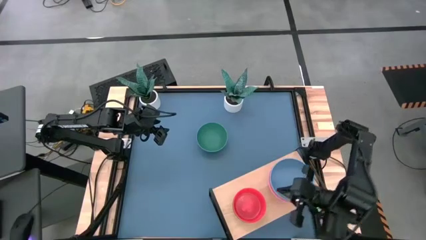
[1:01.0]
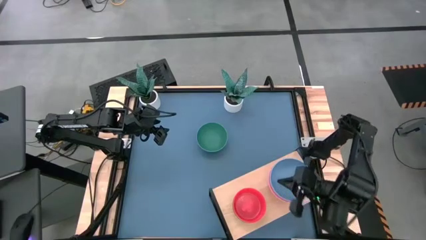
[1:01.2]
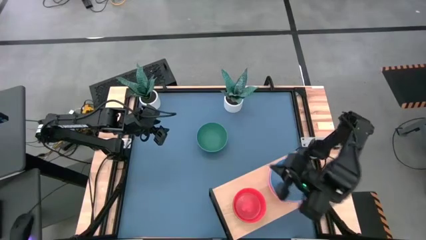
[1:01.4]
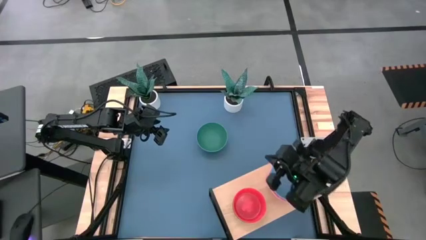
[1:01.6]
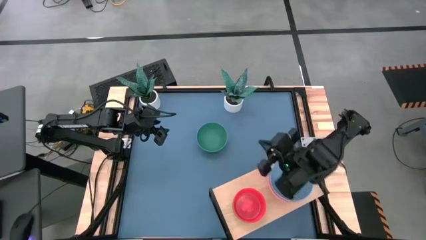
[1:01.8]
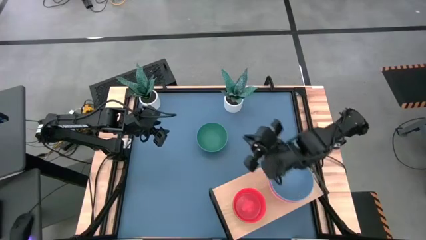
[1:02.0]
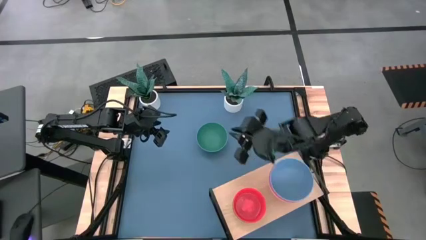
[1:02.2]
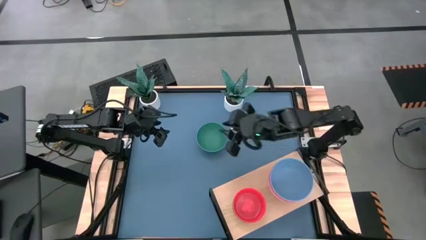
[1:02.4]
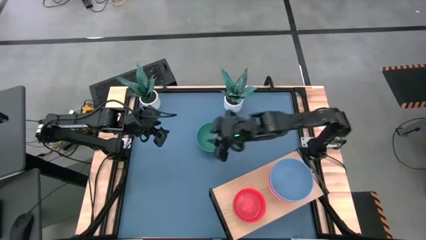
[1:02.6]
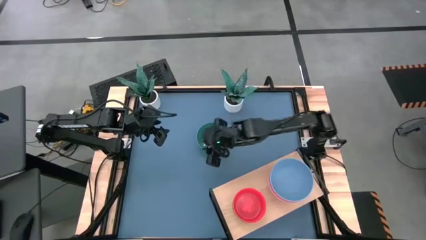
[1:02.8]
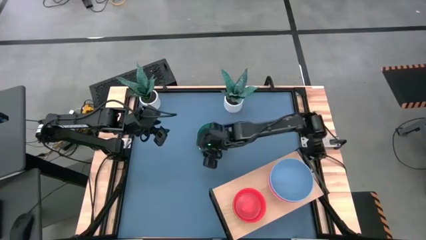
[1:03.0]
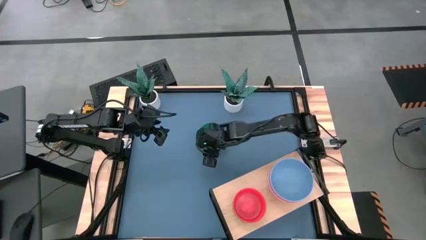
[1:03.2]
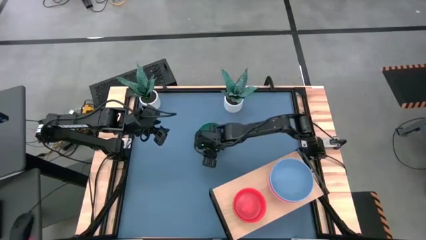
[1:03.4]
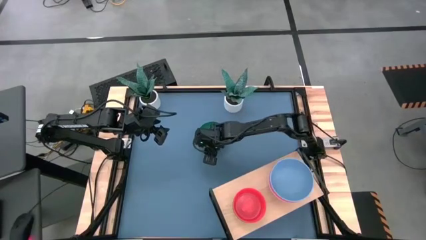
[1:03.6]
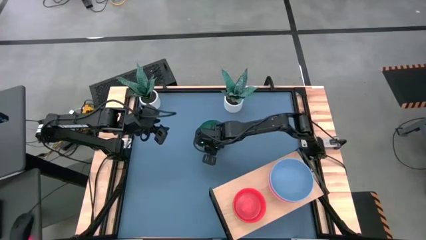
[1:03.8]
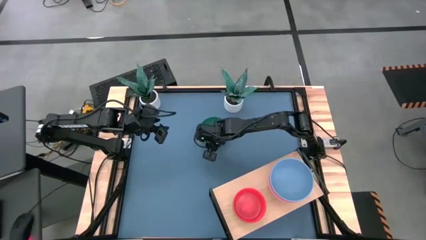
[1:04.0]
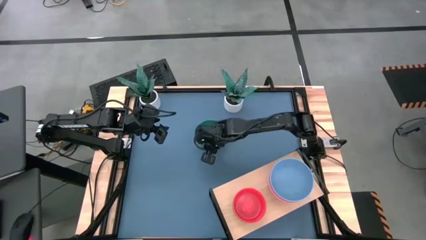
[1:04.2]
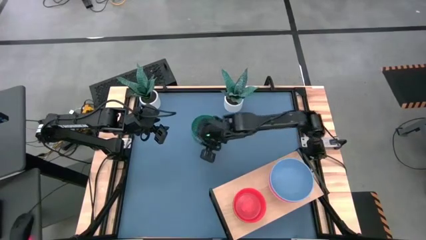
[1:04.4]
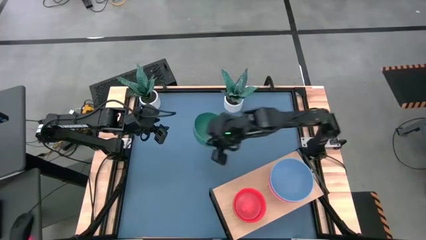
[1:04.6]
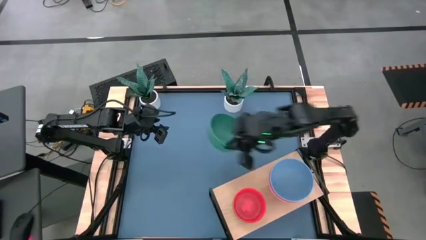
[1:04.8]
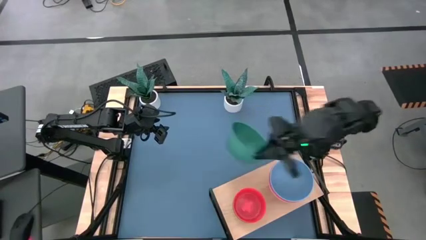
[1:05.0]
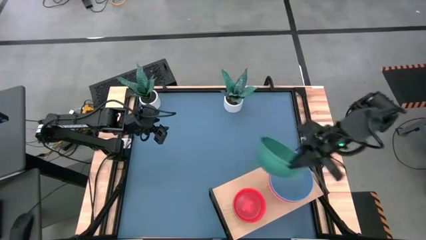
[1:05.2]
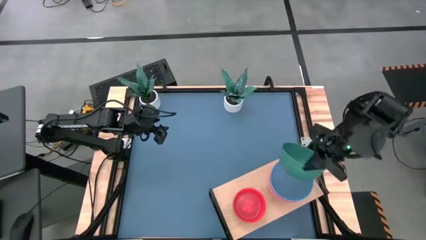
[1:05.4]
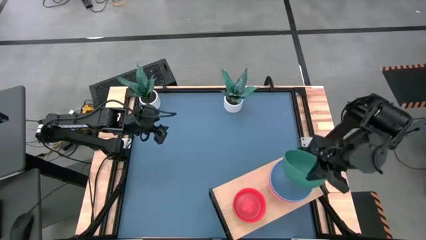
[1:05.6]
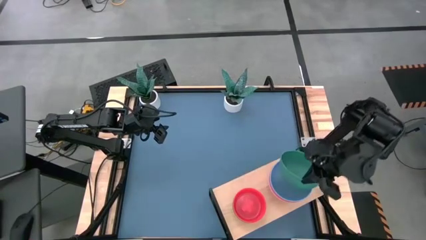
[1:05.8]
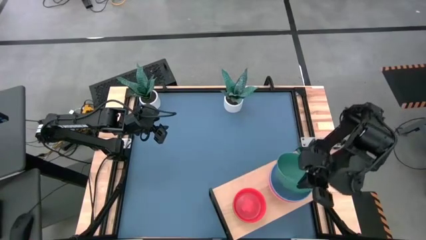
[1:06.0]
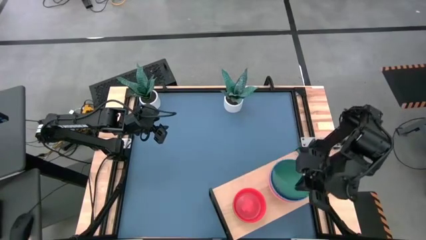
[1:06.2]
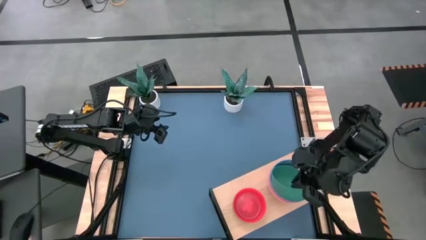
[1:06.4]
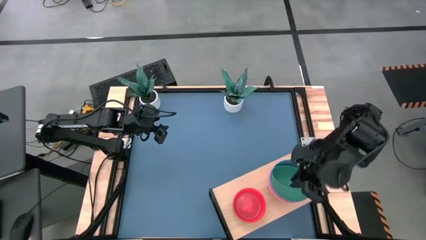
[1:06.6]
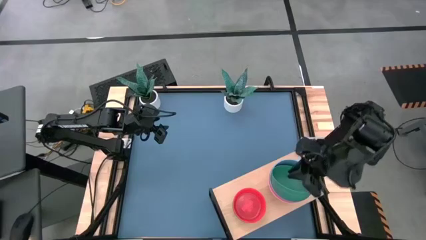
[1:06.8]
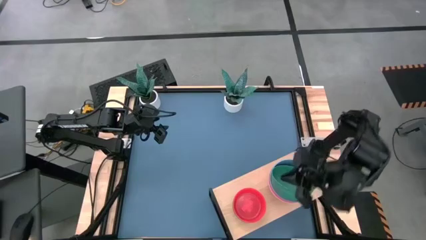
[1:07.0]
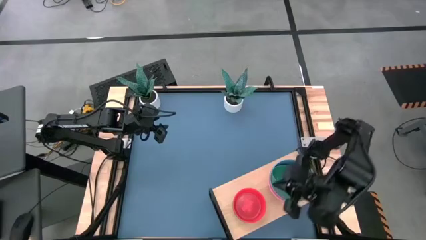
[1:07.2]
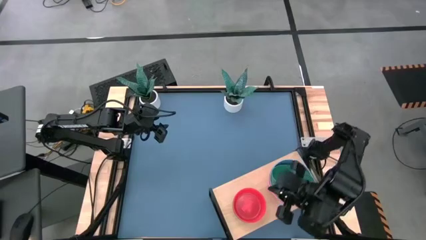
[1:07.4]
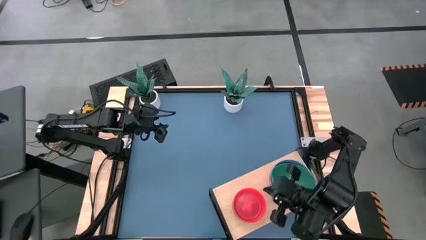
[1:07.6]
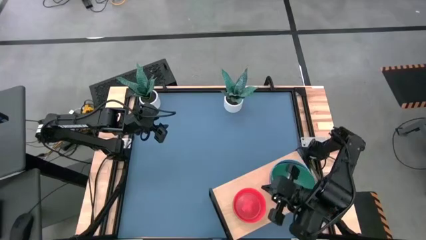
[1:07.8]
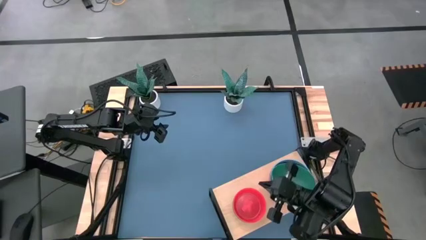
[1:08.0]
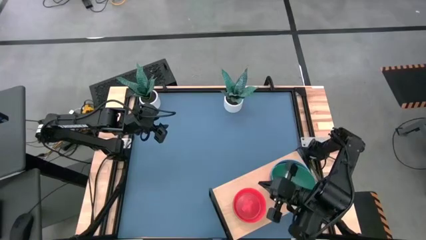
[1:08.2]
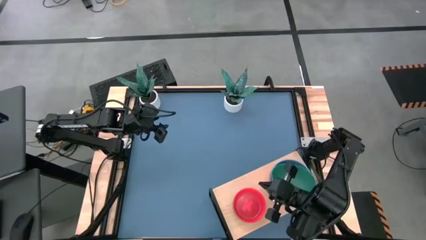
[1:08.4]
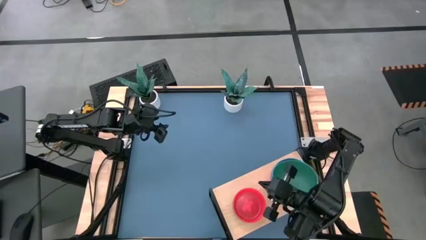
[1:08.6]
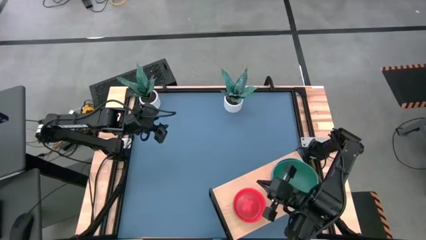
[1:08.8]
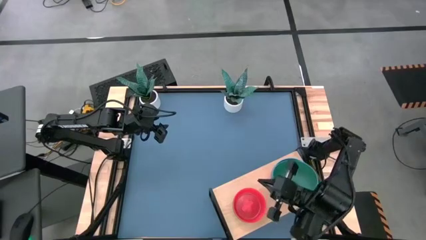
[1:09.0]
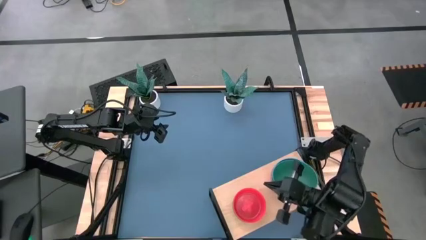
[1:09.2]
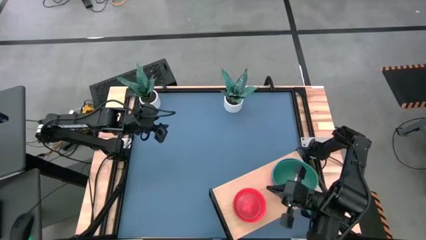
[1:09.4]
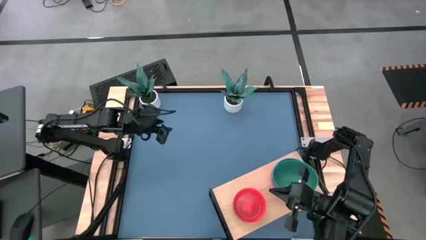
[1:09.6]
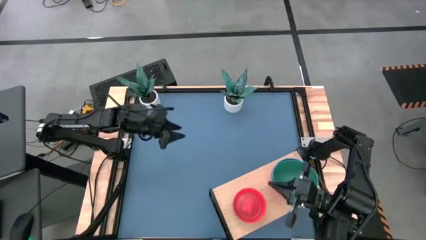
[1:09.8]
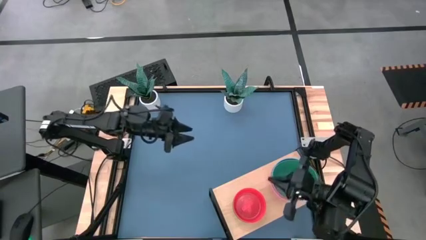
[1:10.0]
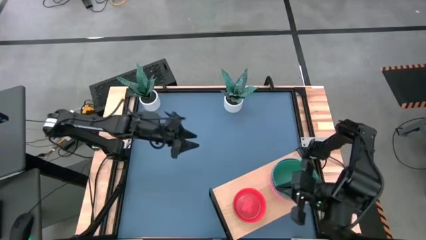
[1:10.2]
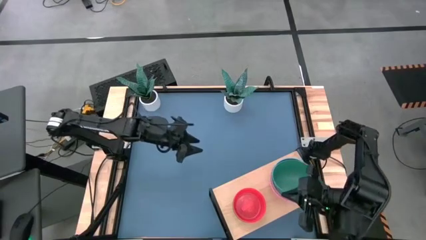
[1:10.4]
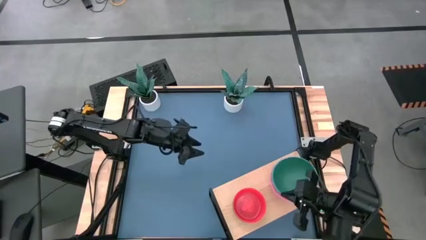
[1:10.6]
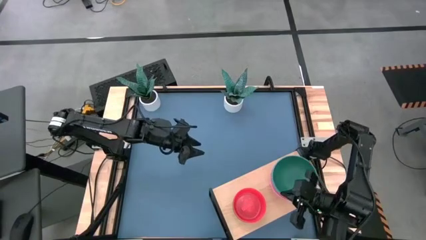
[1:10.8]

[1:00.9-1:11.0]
Task: Place and stack bowls onto a shelf
Stack the green bowl on top of the blue bowl on the shelf

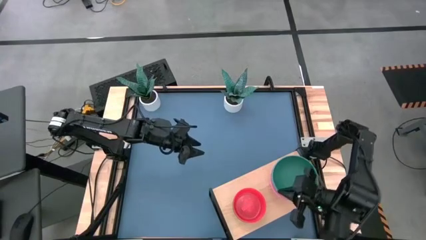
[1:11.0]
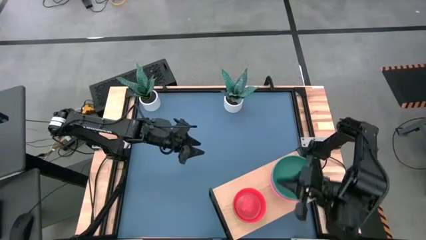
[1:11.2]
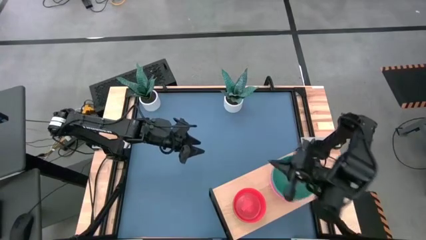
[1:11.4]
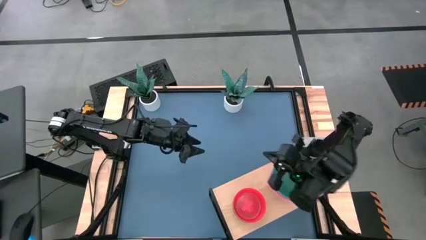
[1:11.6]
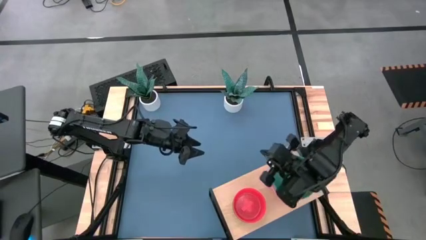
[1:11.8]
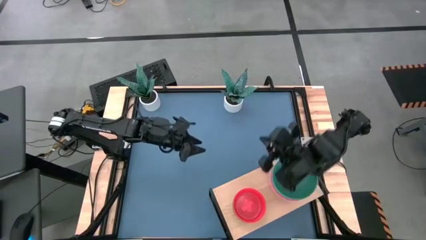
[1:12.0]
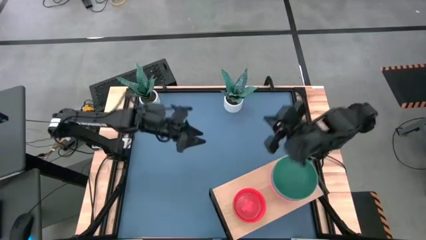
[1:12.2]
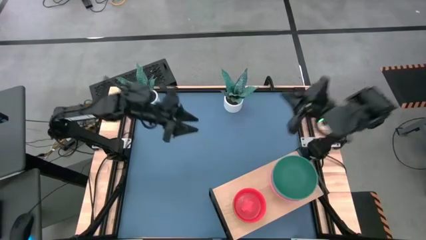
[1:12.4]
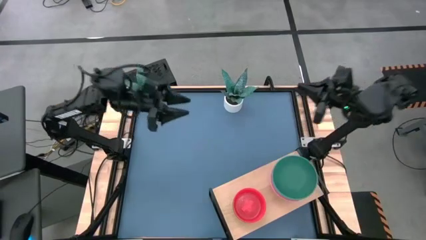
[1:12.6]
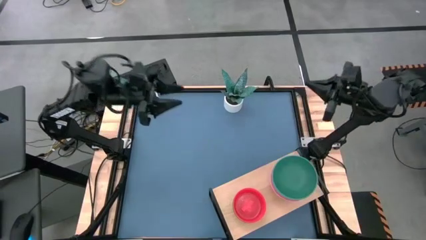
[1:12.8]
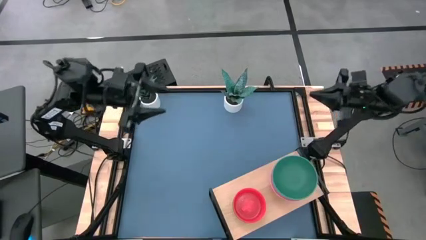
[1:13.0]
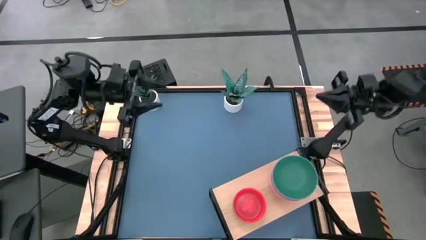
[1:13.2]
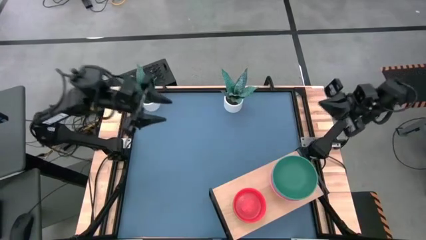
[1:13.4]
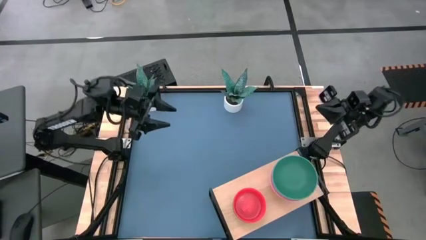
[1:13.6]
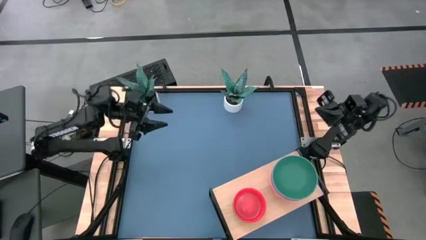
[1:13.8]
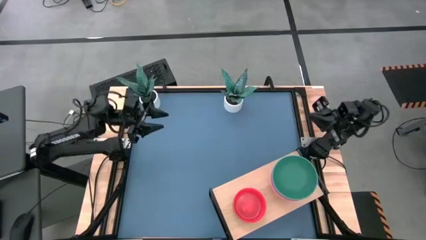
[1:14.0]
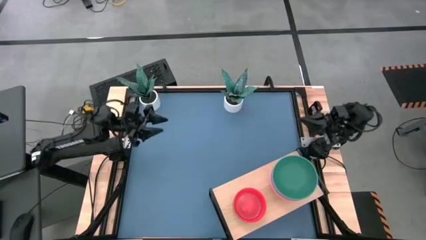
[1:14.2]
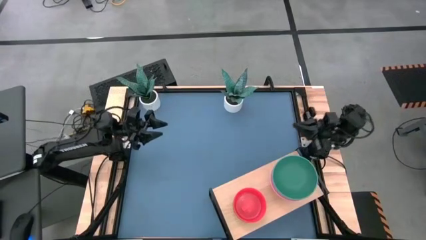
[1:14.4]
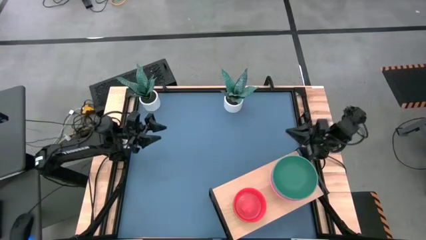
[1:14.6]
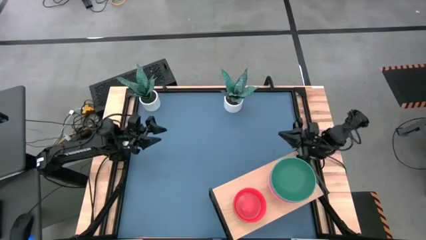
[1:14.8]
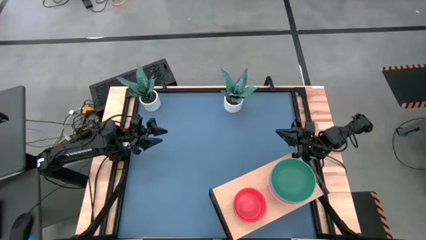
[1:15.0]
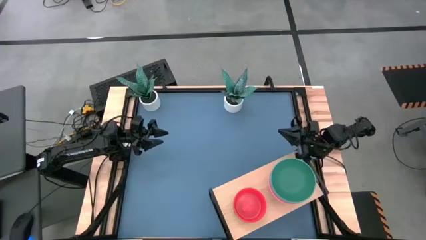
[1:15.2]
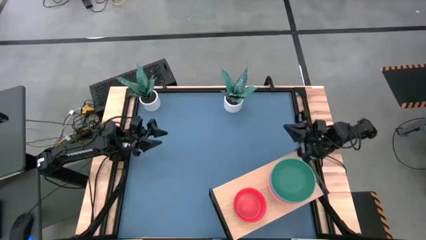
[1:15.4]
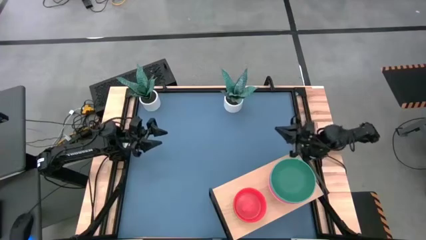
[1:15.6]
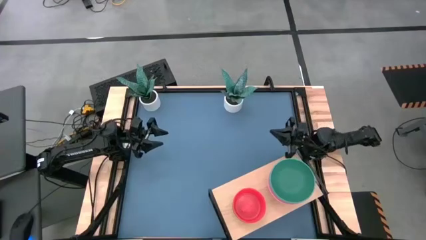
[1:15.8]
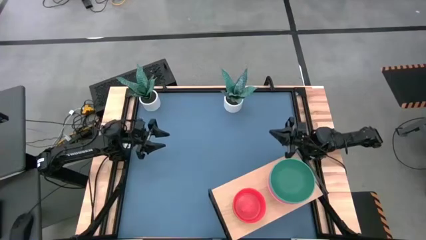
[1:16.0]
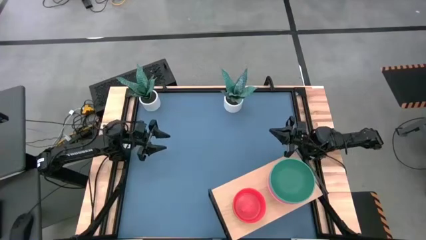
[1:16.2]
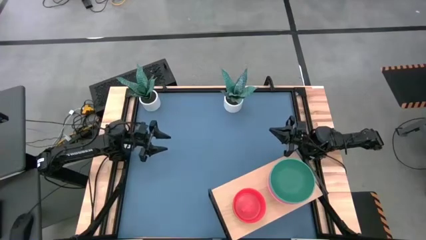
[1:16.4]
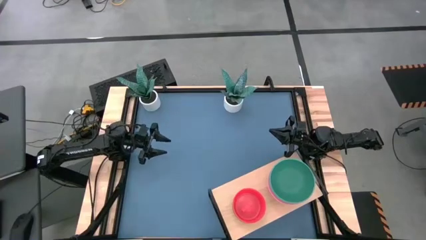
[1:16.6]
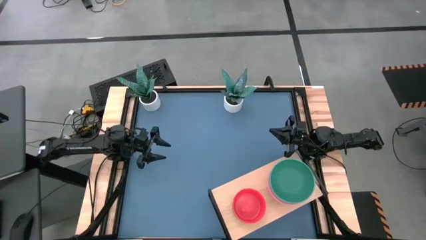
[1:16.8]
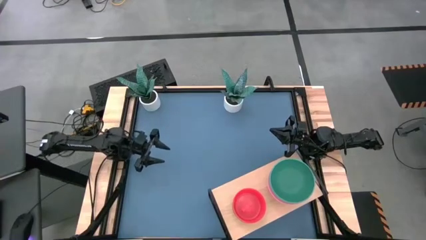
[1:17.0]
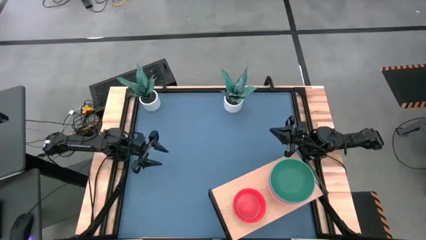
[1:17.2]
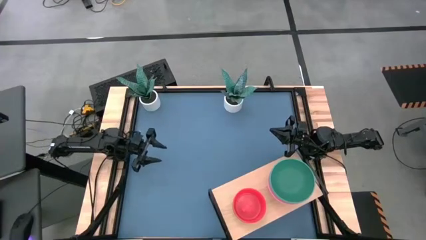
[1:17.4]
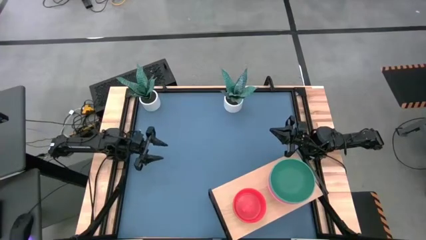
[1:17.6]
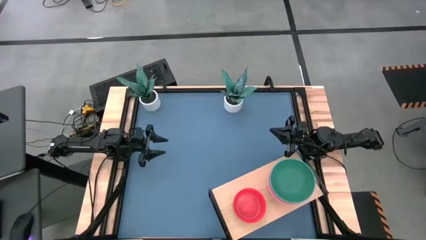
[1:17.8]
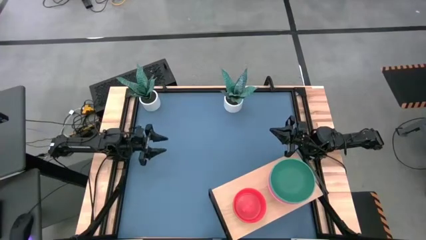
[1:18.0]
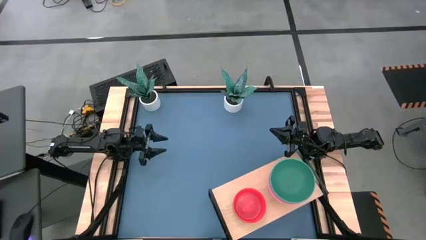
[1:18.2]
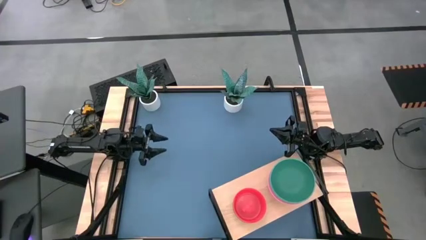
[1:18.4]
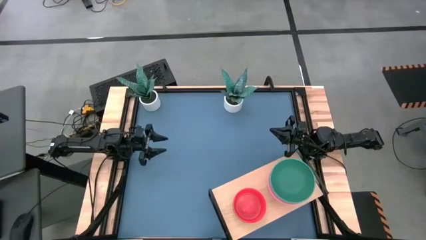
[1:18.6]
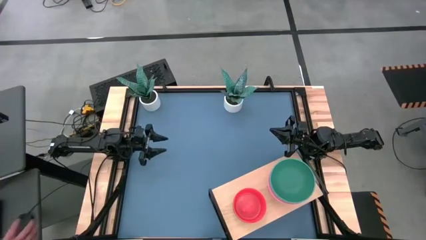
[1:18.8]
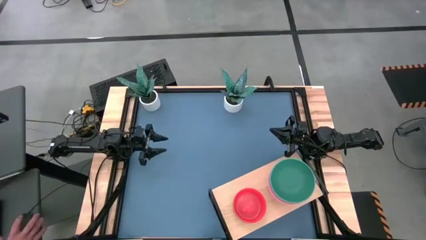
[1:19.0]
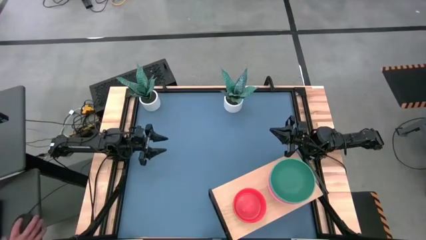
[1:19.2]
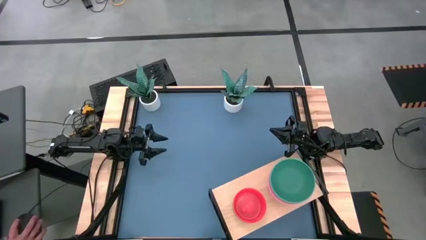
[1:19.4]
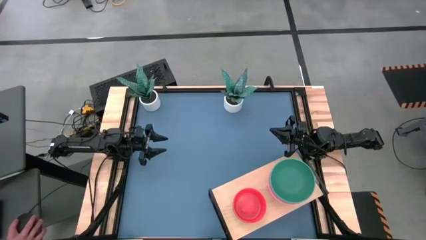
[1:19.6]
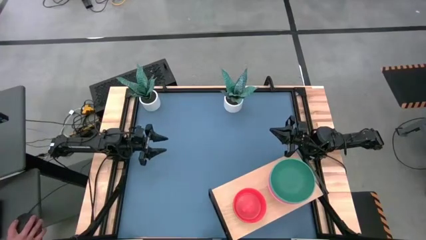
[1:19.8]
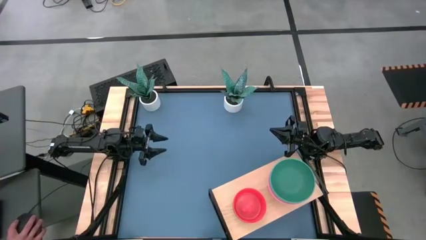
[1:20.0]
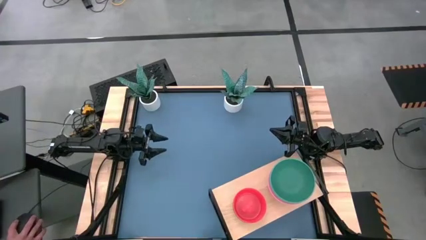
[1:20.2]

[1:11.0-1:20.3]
Return to Home Position
